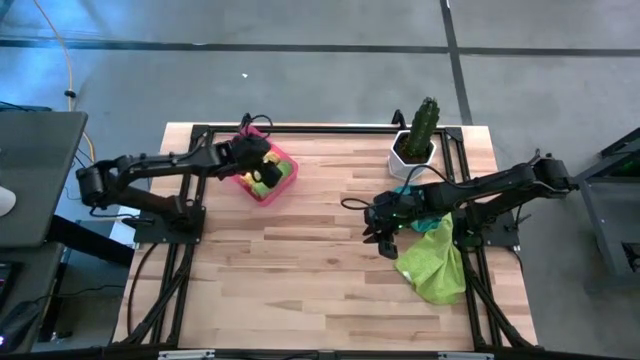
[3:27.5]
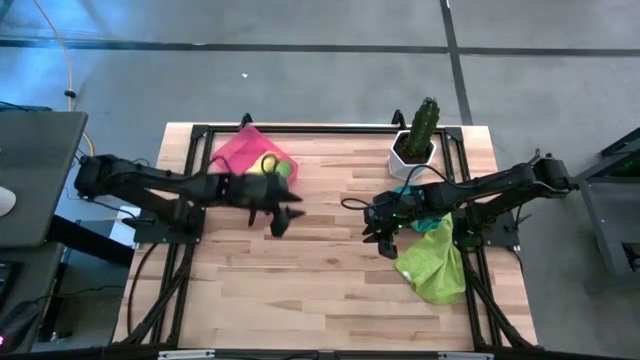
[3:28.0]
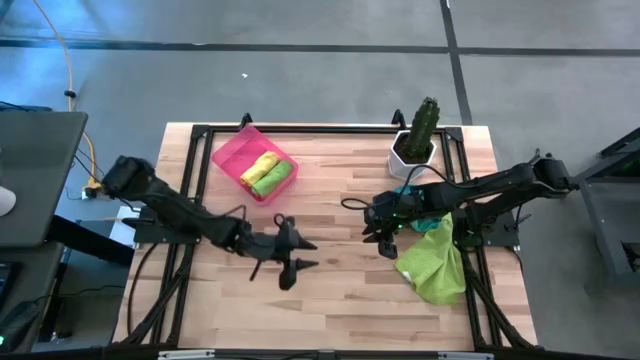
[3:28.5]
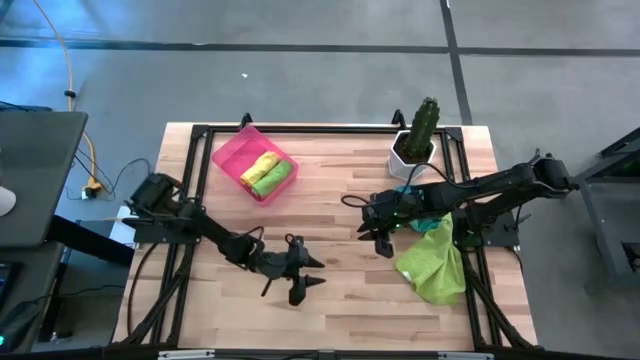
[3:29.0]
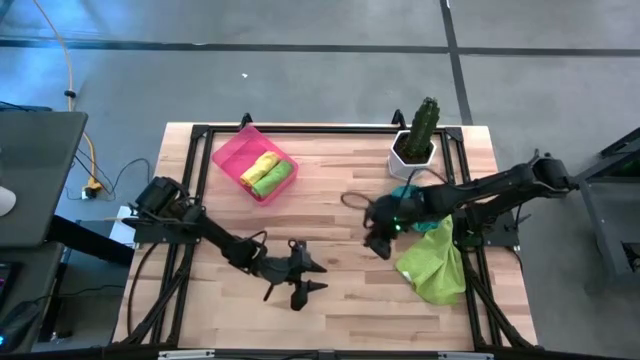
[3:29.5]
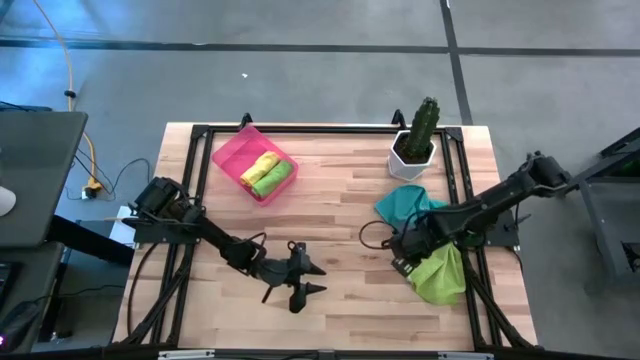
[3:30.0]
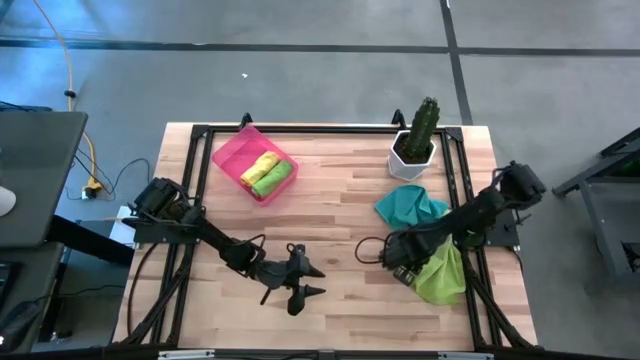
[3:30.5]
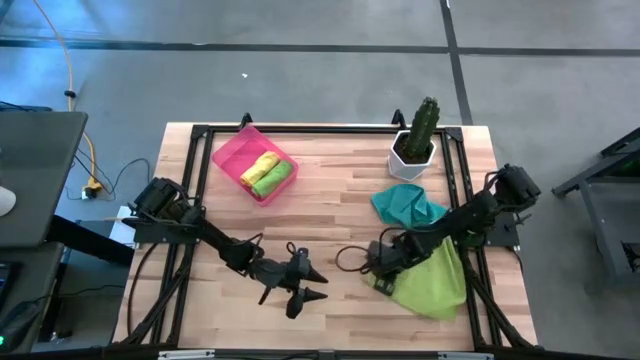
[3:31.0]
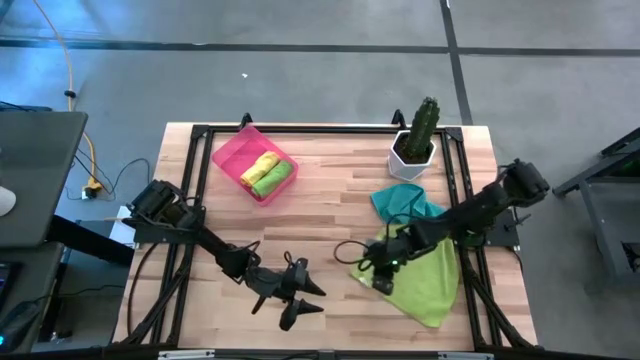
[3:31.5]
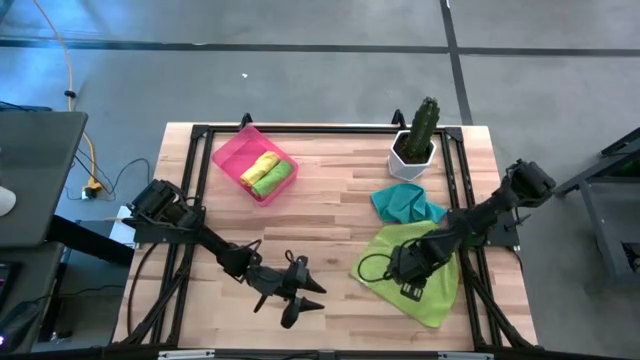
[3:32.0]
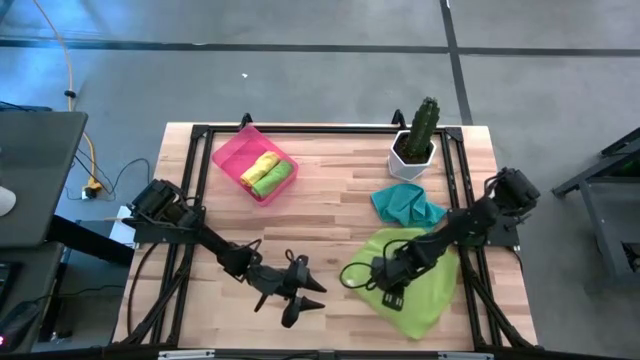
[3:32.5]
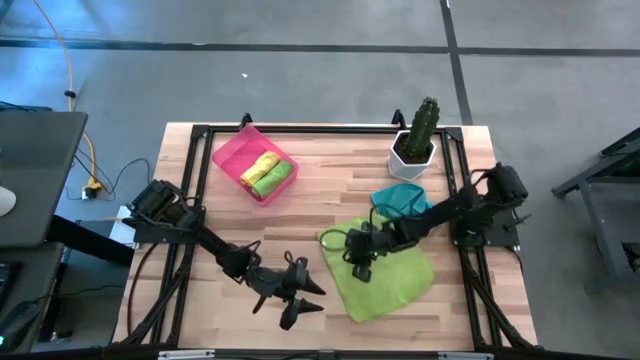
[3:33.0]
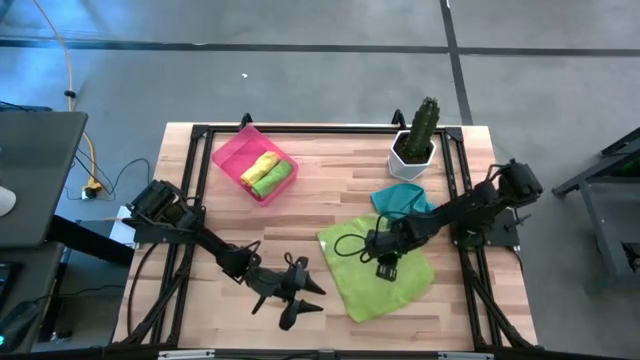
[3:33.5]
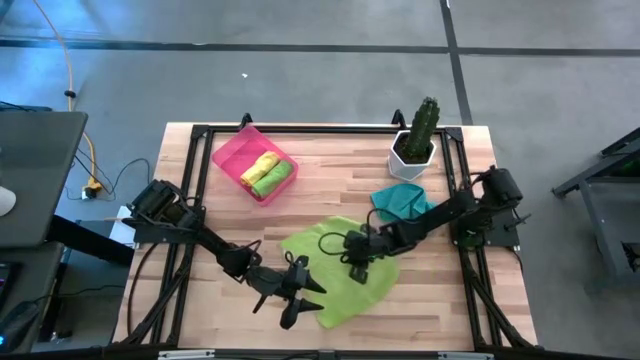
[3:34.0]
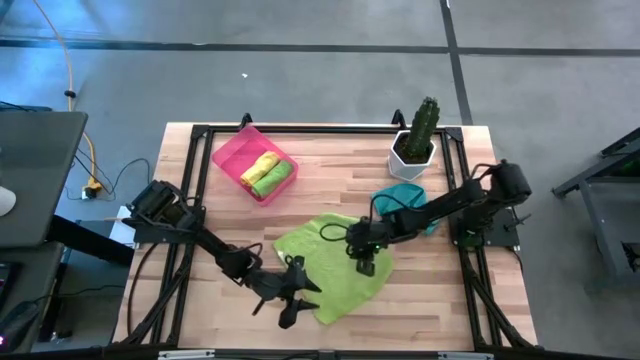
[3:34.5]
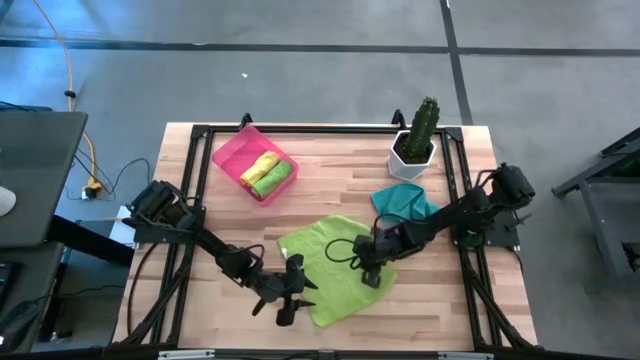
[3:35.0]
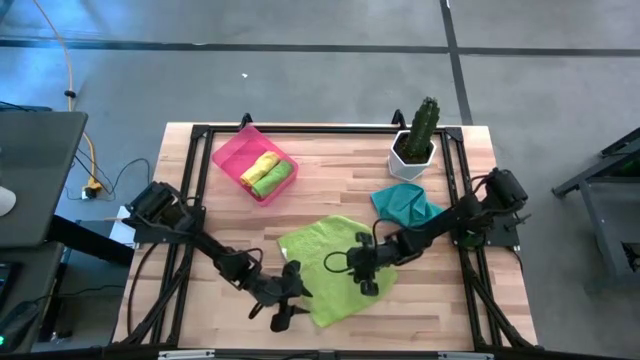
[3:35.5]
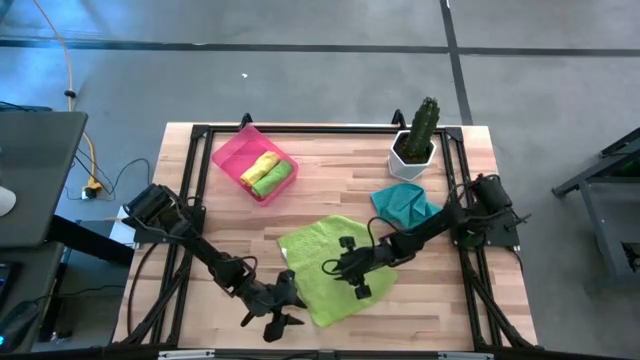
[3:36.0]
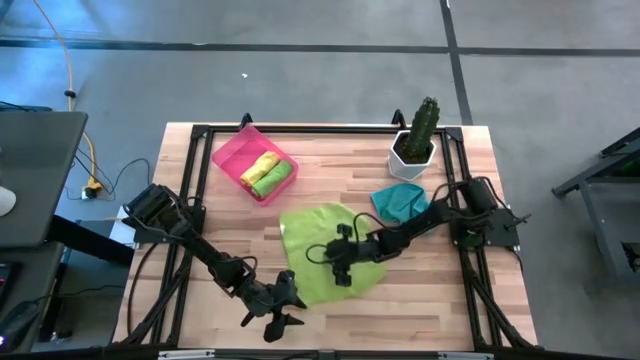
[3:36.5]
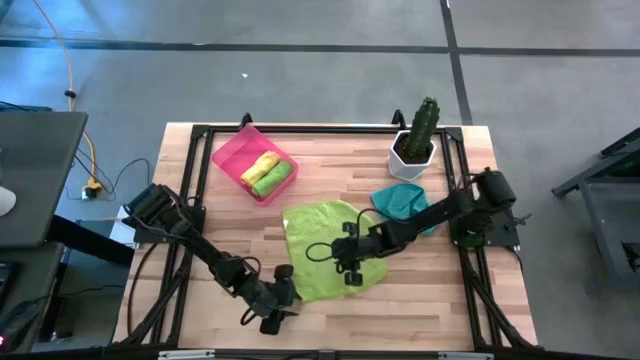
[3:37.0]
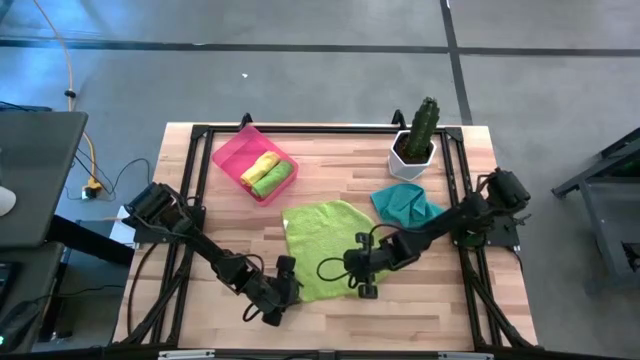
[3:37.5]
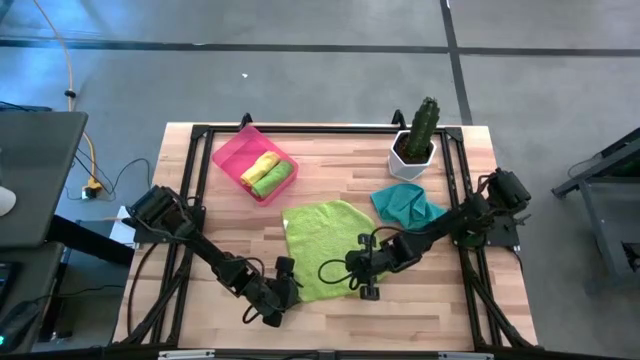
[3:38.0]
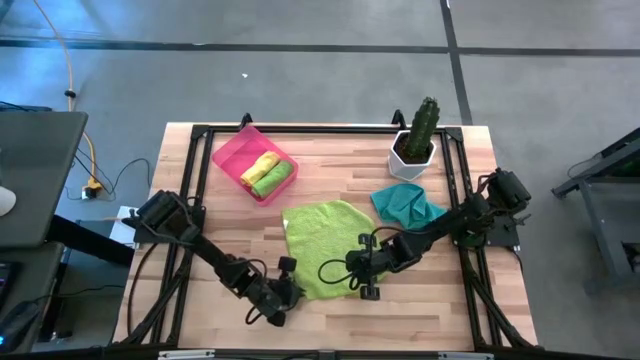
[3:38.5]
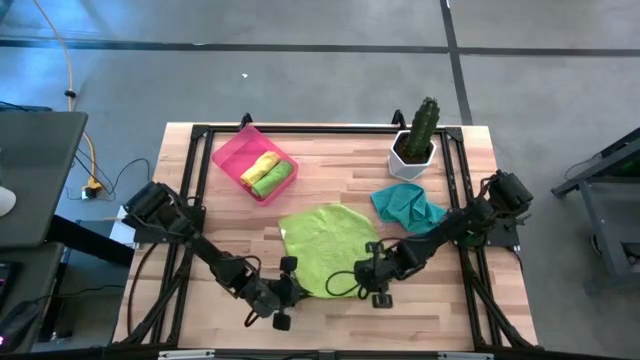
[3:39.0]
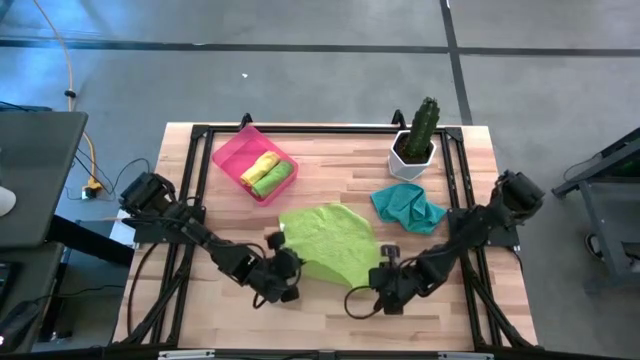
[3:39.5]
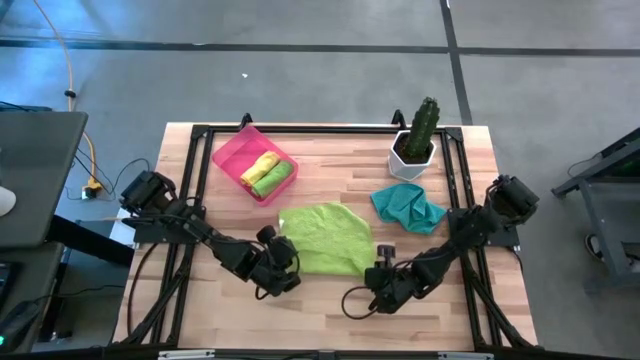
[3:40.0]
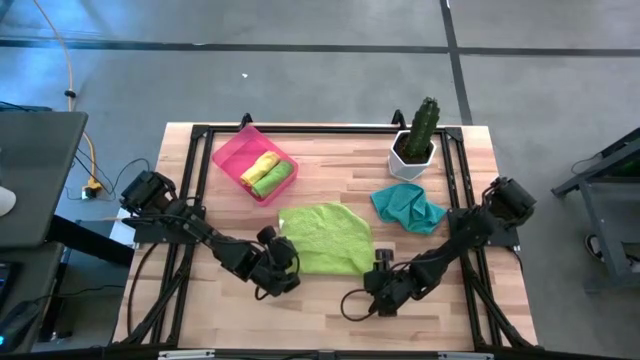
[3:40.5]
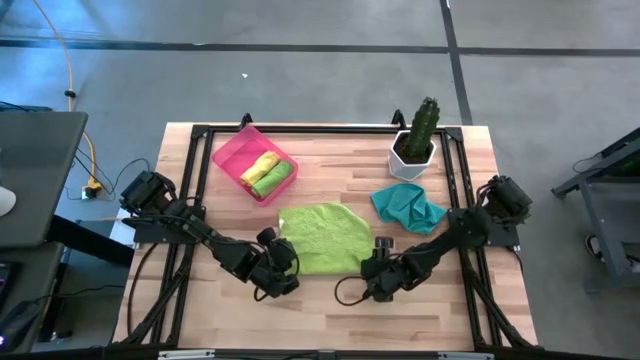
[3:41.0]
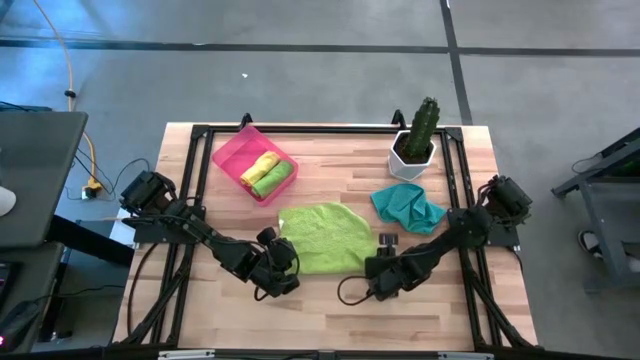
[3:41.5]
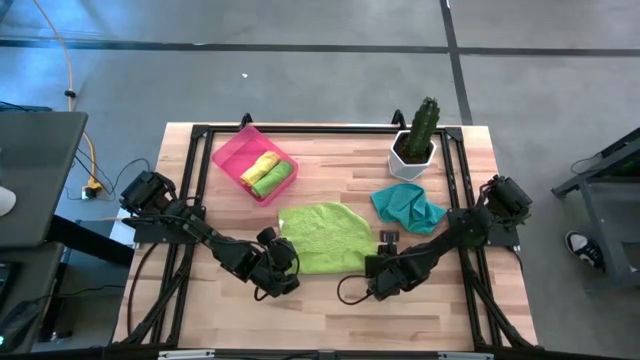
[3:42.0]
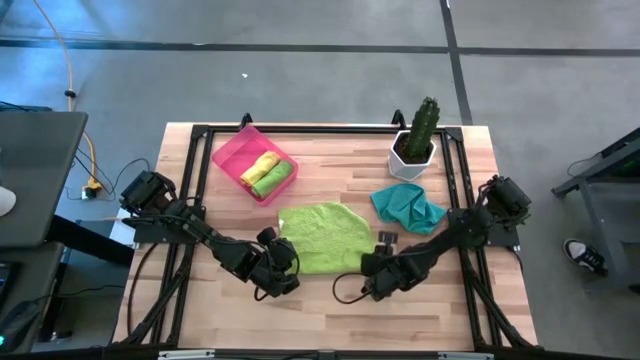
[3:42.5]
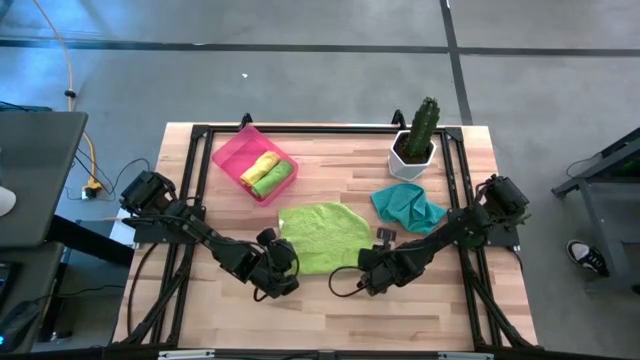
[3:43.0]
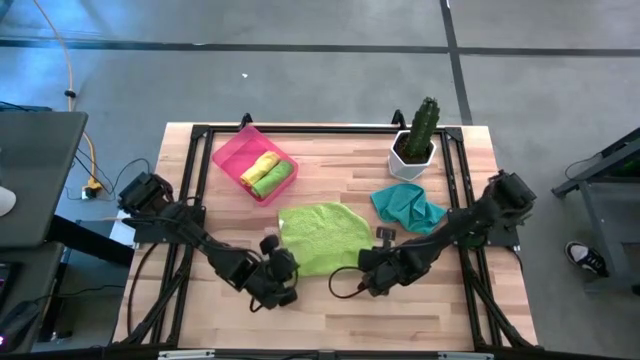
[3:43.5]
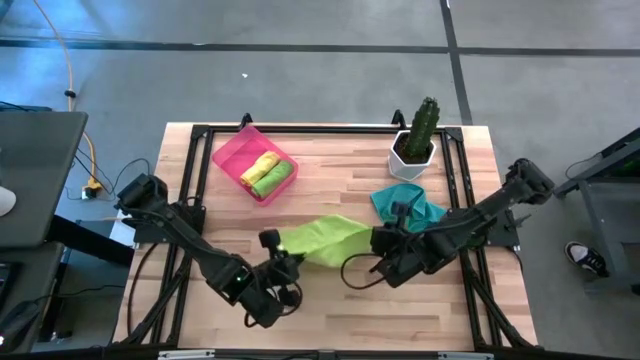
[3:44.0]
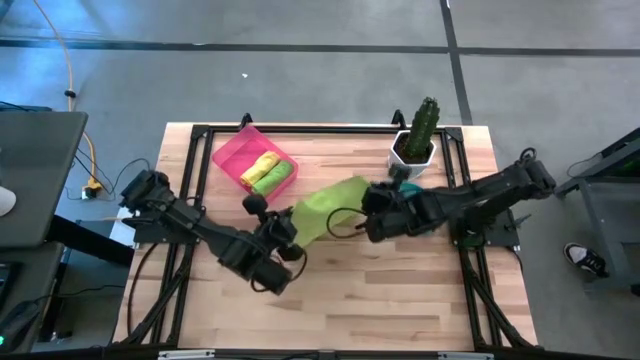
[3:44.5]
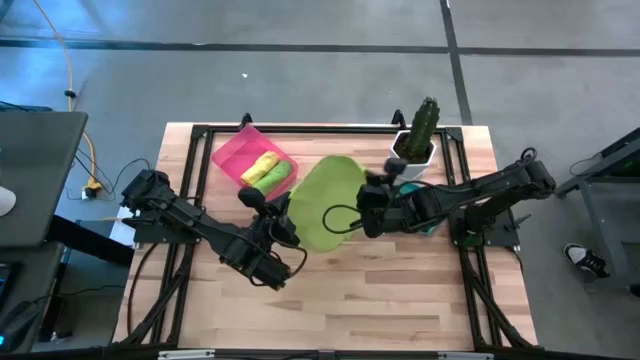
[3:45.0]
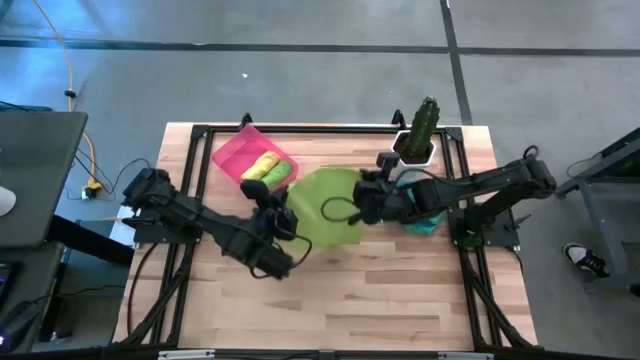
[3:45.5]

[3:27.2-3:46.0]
Task: Roll microfiber towels into tight, uniform cylinder then place into a basket
Roll the light green microfiber cloth

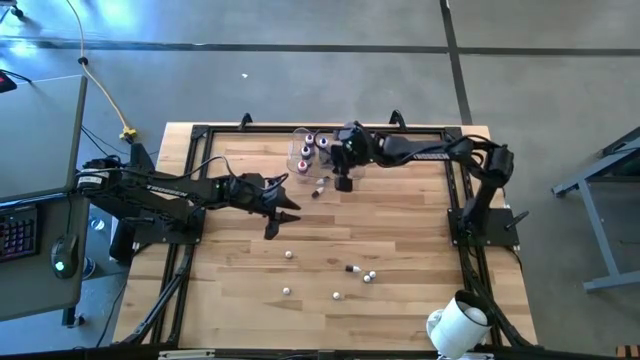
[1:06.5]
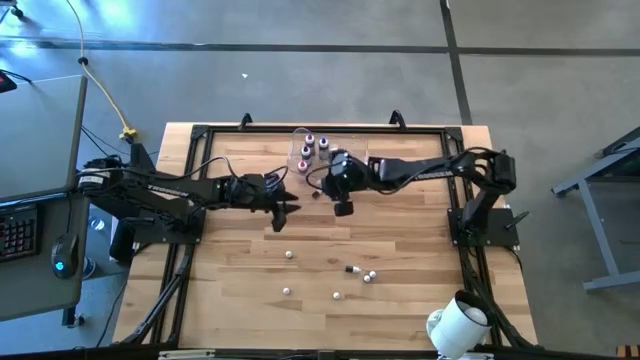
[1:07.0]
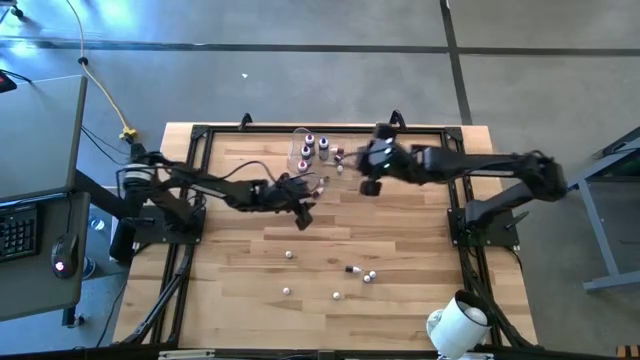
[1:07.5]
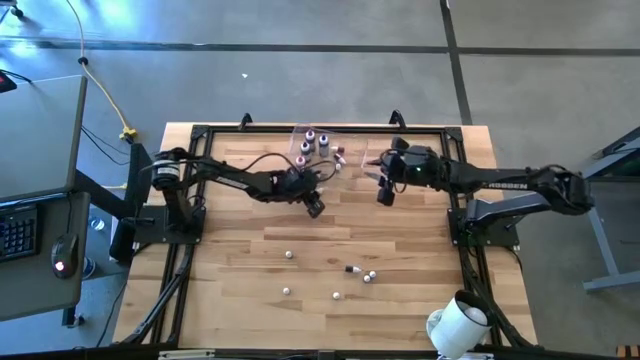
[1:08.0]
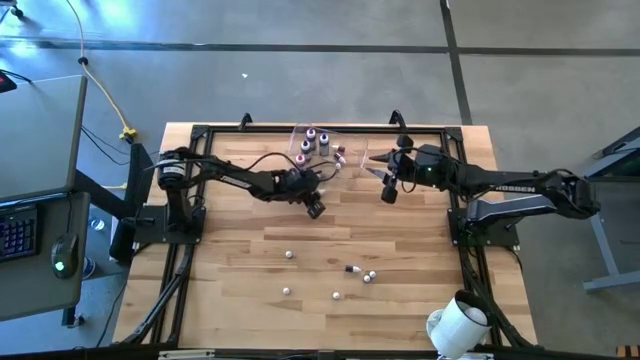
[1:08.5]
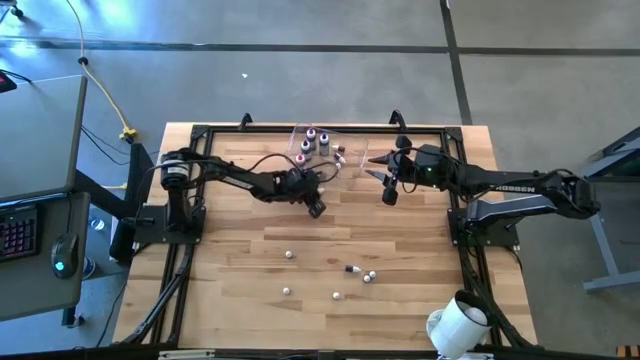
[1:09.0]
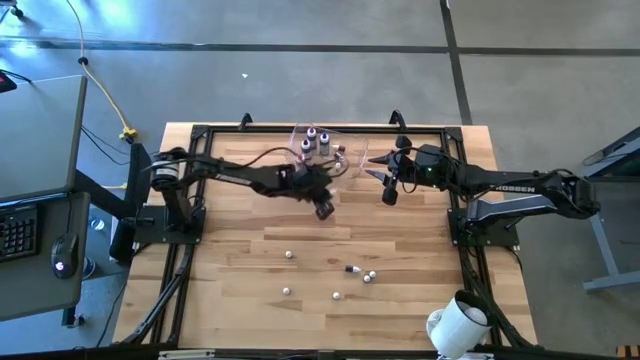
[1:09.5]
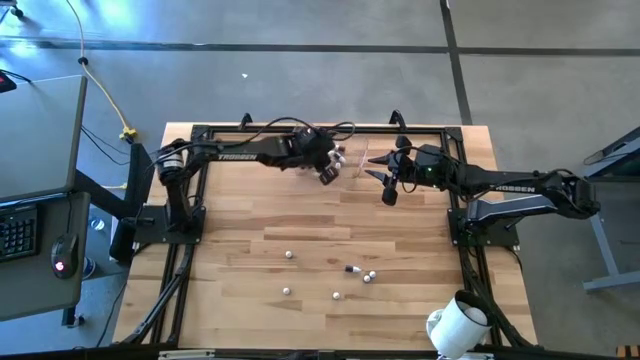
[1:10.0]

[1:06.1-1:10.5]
Task: Pick & Place food coloring
Put the purple food coloring into the transparent bin
